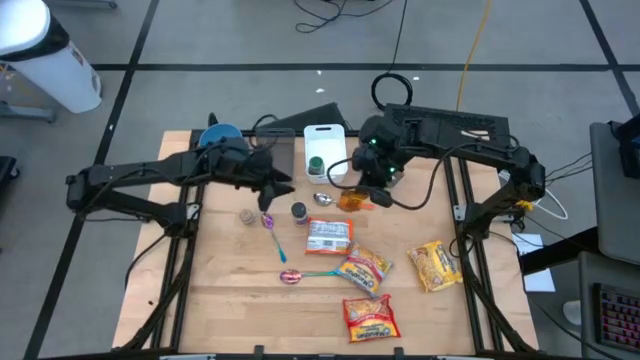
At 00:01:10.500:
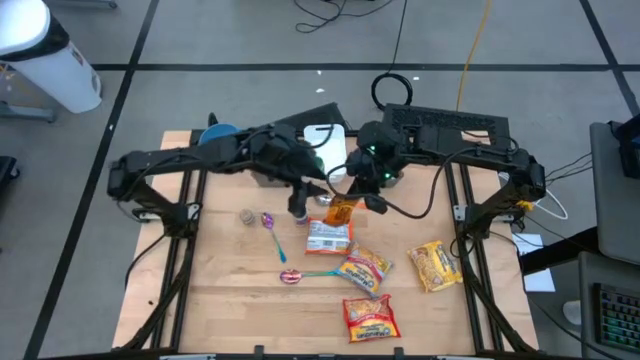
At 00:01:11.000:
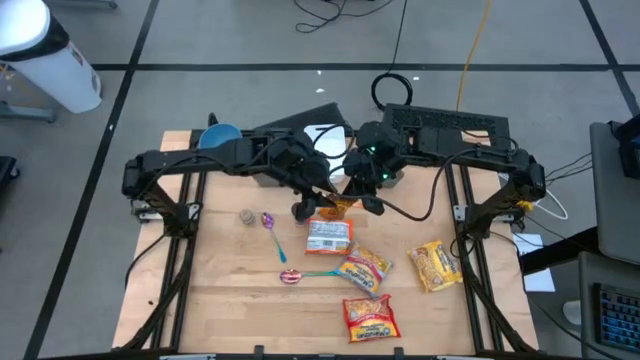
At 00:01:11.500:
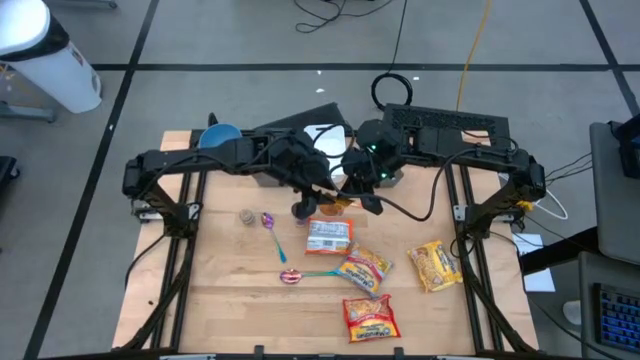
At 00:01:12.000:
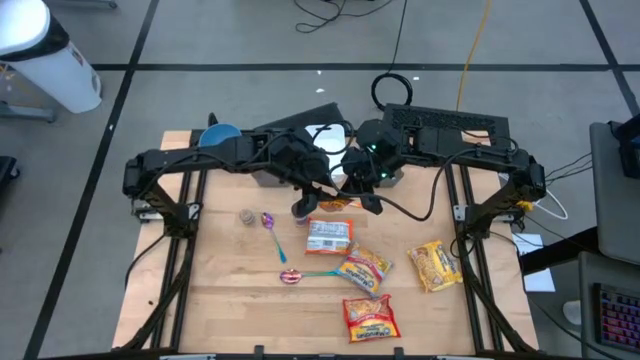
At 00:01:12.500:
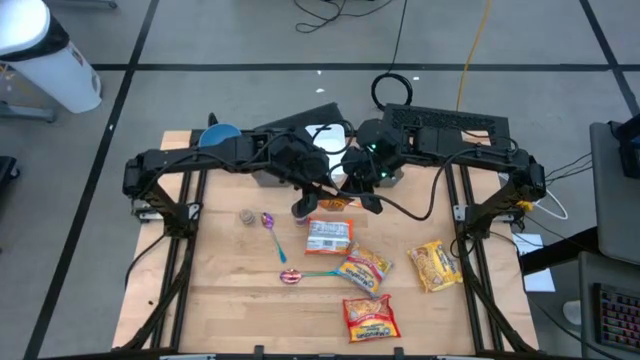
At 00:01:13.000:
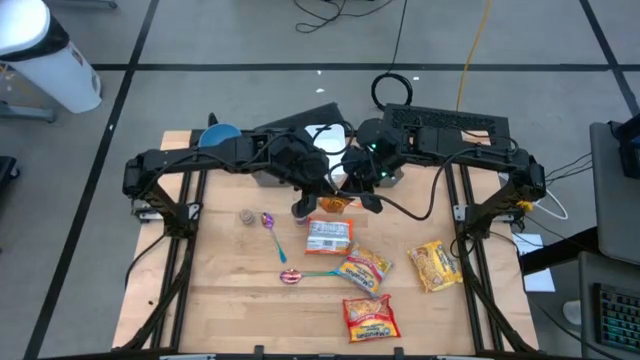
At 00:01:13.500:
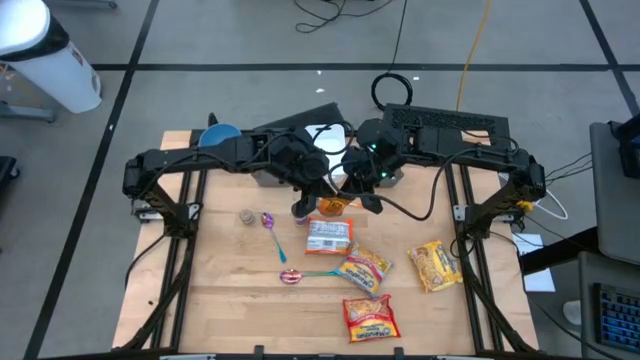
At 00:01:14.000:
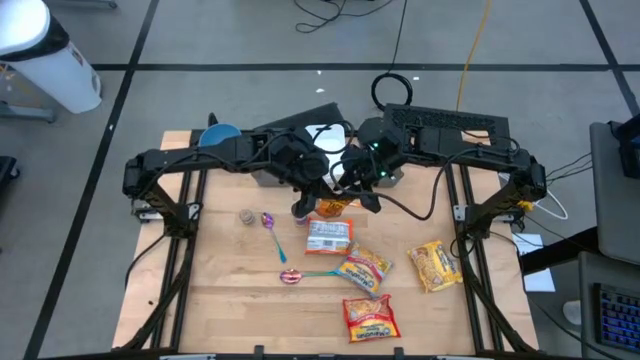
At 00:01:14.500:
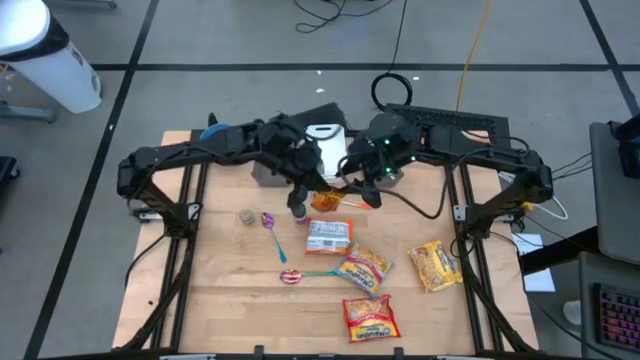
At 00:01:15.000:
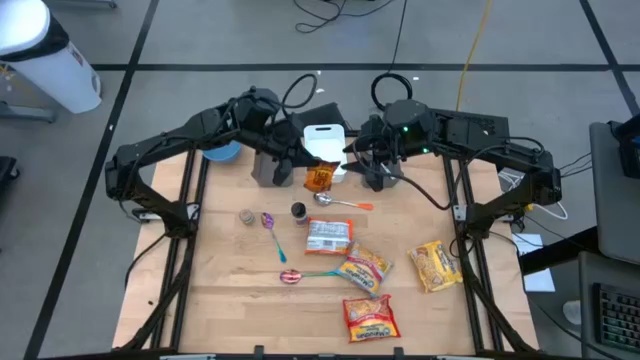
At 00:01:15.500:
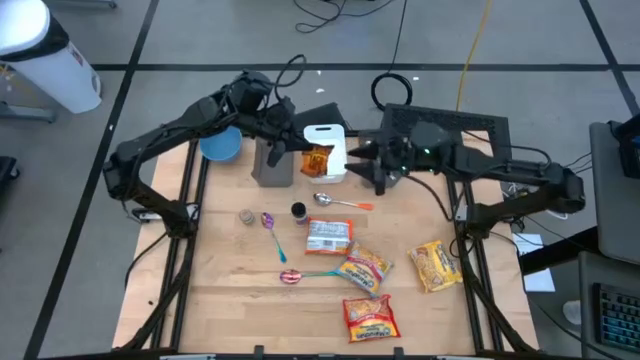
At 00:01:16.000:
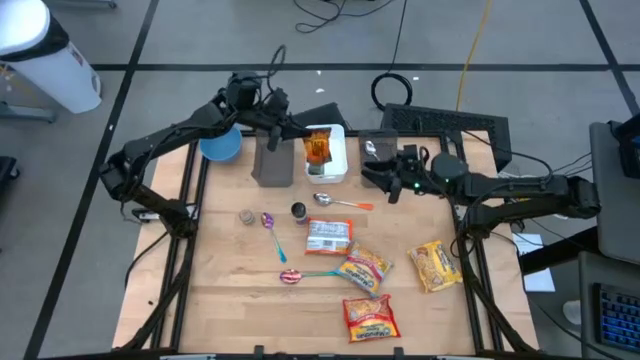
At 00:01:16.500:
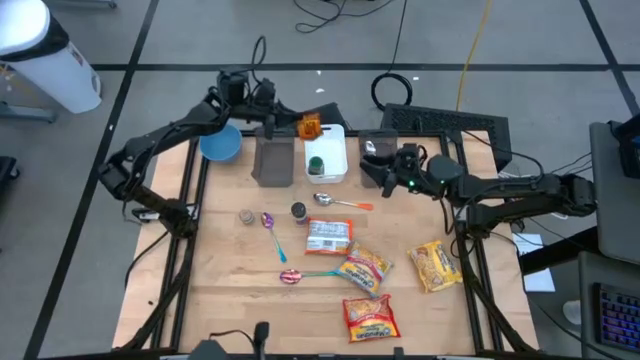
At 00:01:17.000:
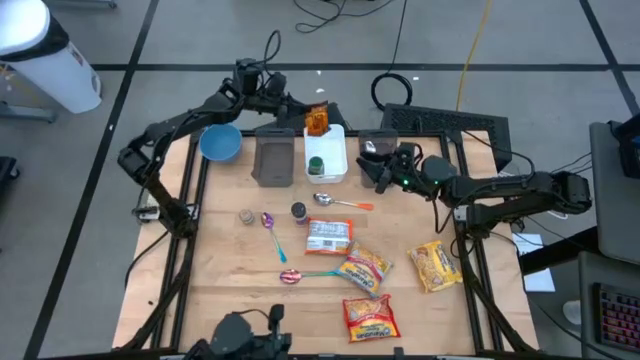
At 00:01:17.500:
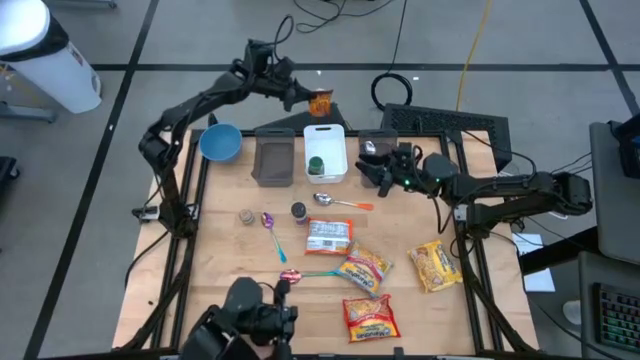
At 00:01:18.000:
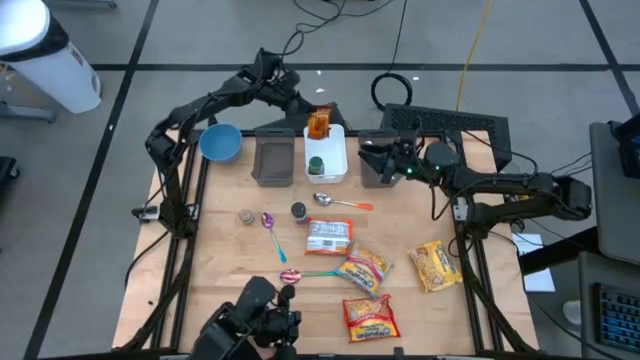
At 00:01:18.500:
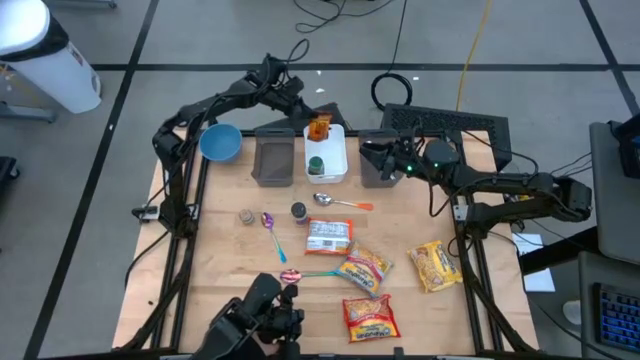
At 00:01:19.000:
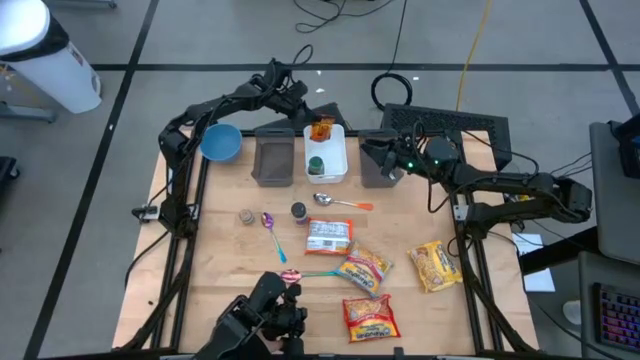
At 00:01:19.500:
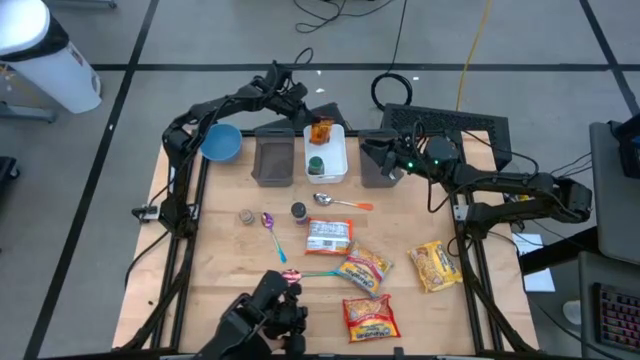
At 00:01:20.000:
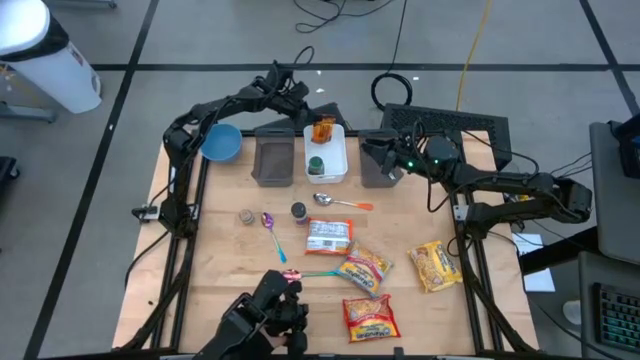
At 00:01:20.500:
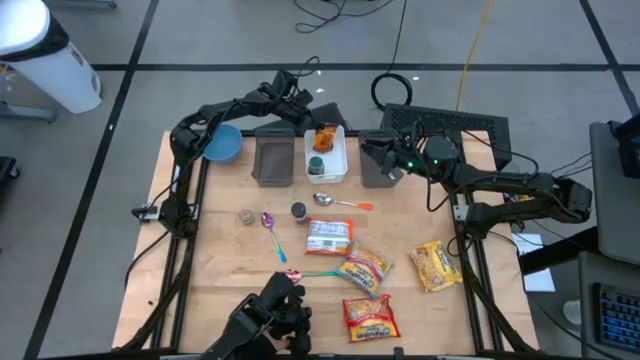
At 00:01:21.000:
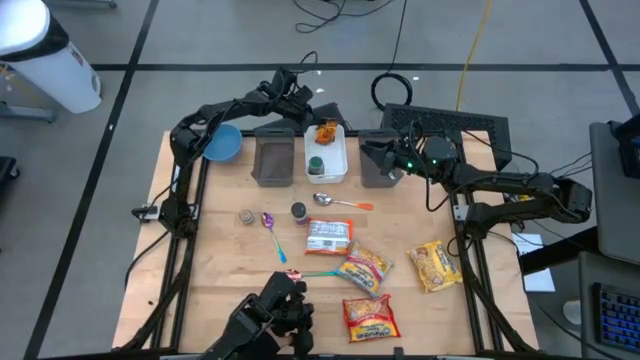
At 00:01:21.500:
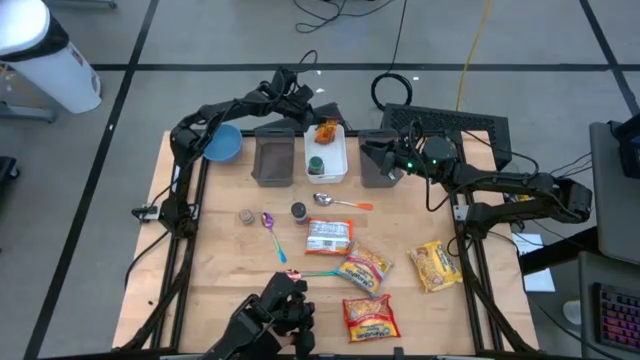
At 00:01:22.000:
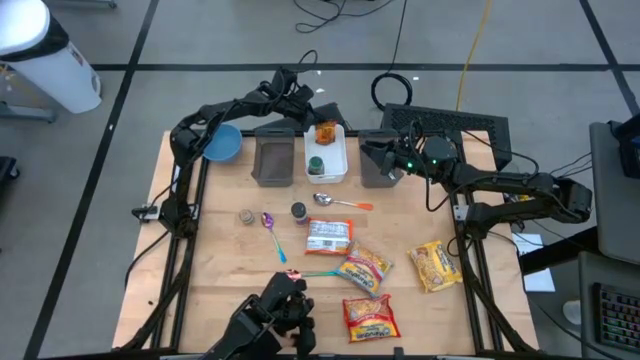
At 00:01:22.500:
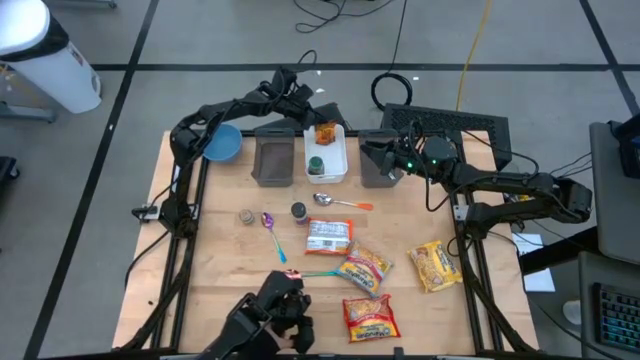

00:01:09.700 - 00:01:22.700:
Task: Pick & Place Food Item
Put the orange seasoning pack into the white bin
